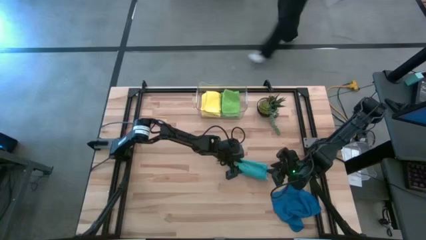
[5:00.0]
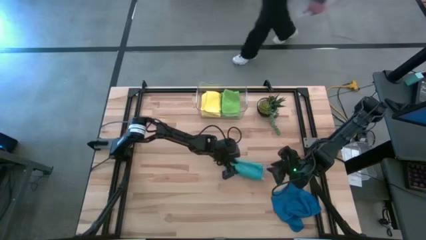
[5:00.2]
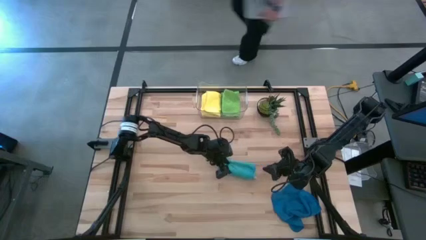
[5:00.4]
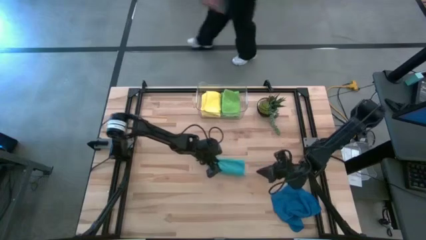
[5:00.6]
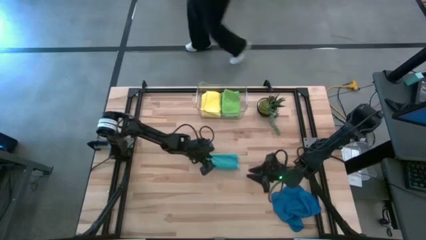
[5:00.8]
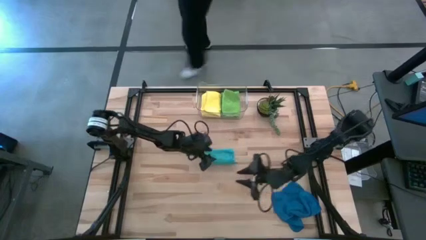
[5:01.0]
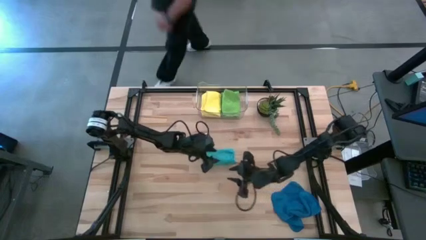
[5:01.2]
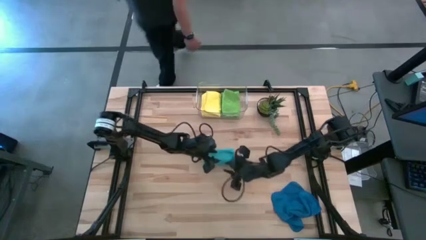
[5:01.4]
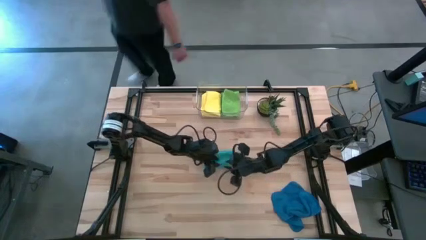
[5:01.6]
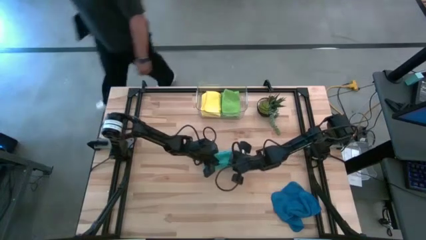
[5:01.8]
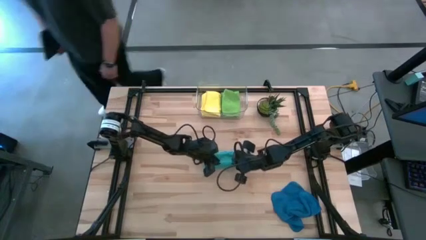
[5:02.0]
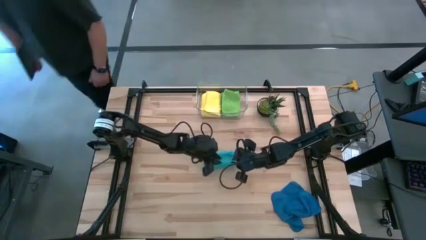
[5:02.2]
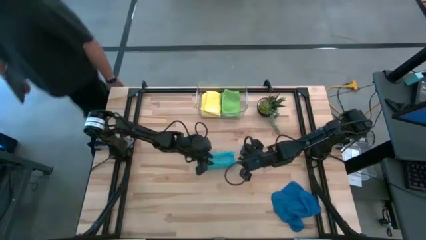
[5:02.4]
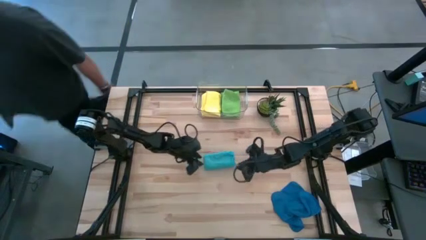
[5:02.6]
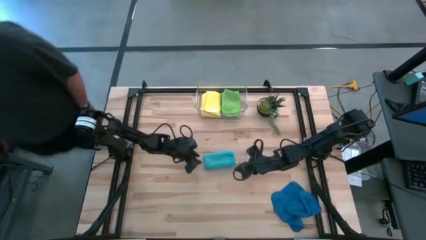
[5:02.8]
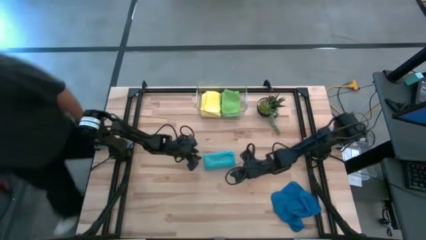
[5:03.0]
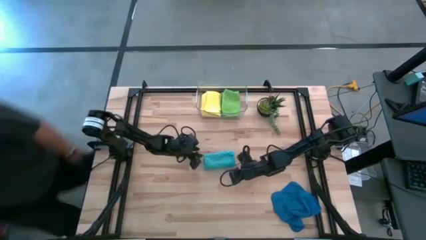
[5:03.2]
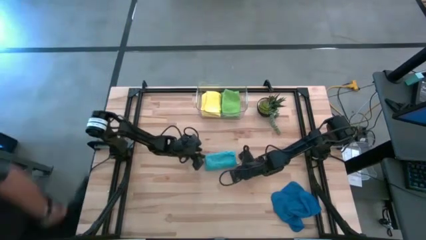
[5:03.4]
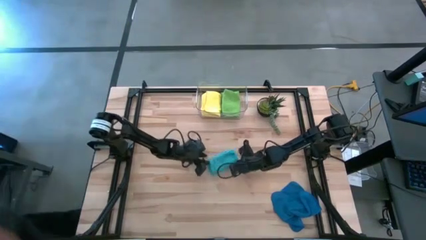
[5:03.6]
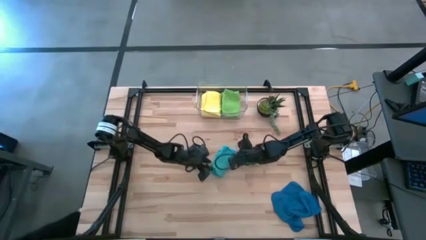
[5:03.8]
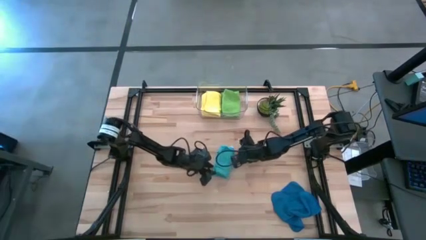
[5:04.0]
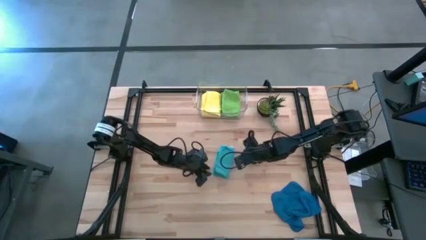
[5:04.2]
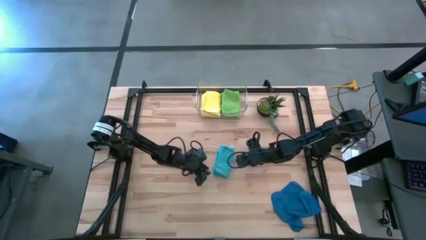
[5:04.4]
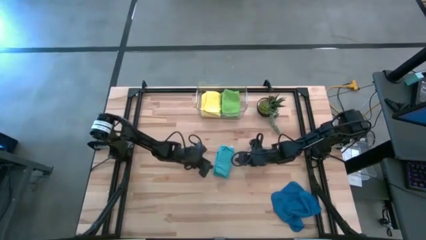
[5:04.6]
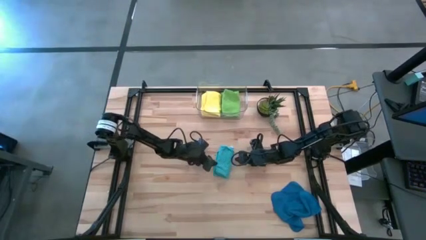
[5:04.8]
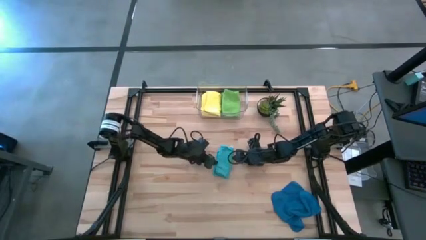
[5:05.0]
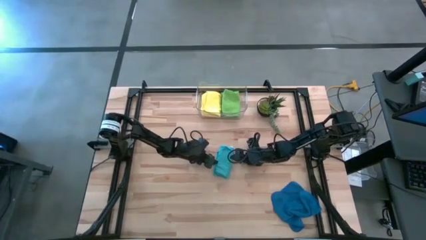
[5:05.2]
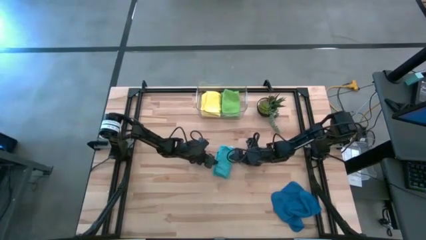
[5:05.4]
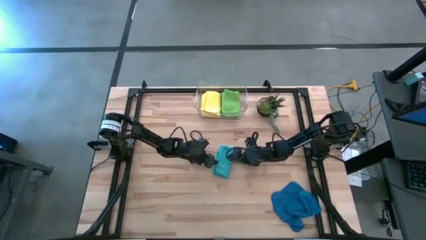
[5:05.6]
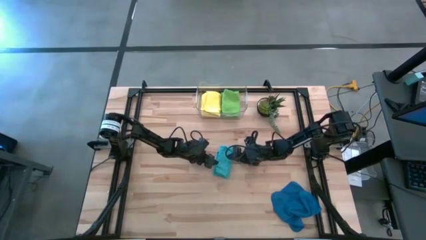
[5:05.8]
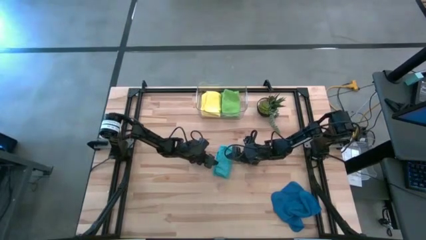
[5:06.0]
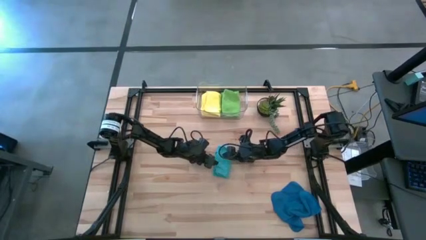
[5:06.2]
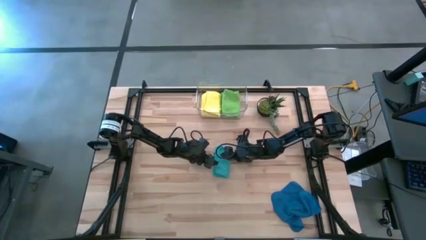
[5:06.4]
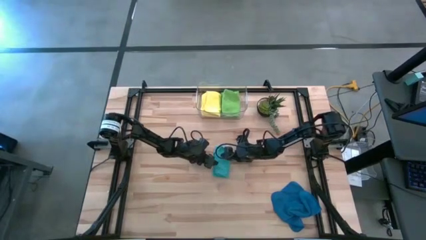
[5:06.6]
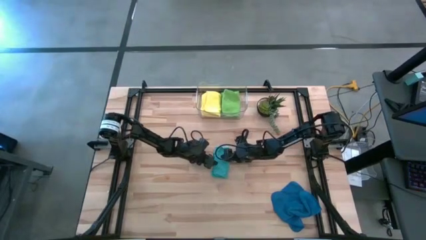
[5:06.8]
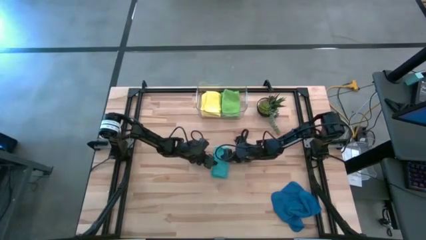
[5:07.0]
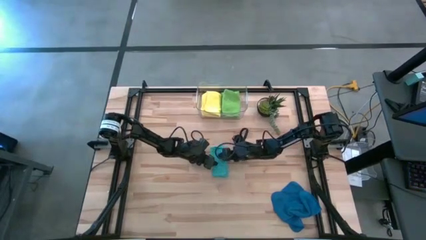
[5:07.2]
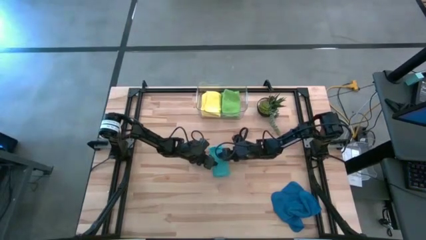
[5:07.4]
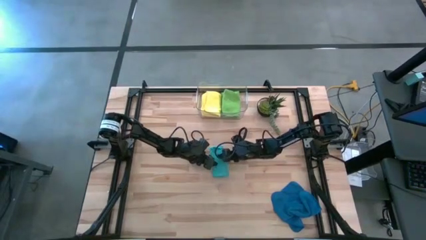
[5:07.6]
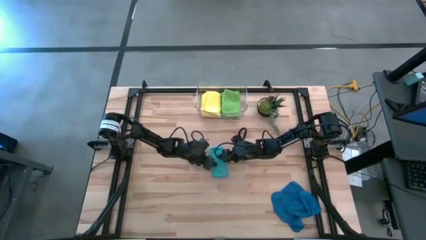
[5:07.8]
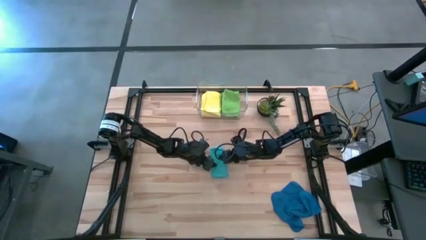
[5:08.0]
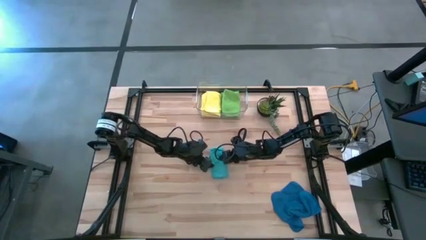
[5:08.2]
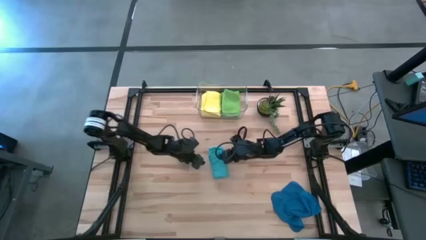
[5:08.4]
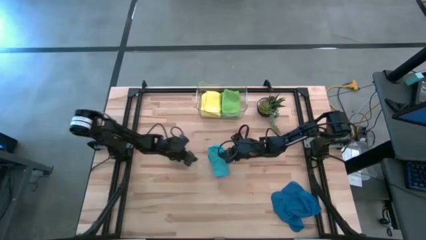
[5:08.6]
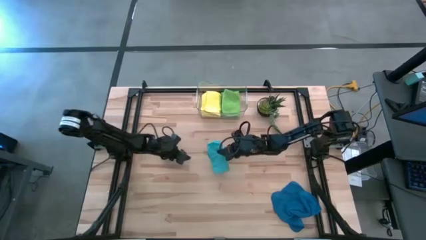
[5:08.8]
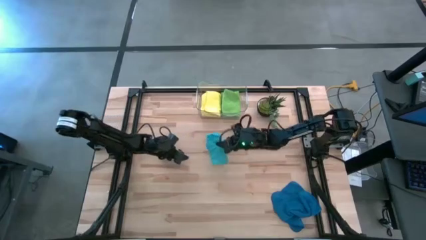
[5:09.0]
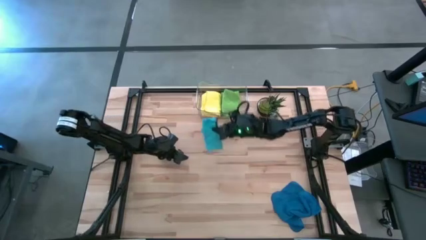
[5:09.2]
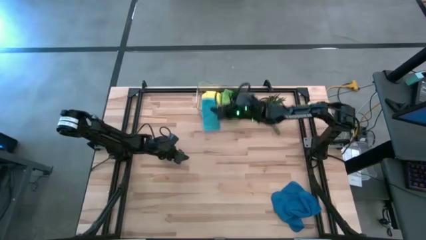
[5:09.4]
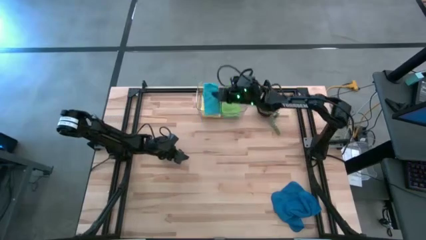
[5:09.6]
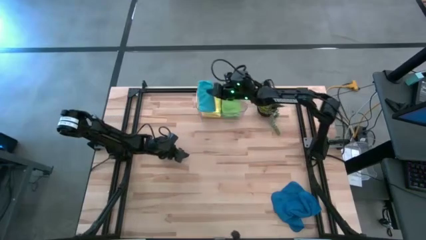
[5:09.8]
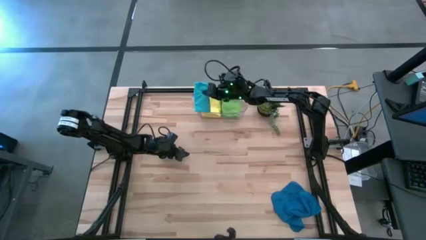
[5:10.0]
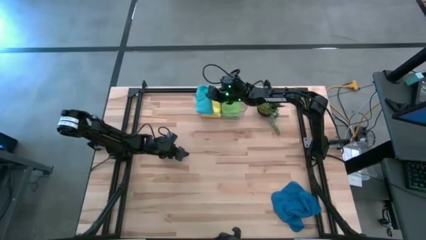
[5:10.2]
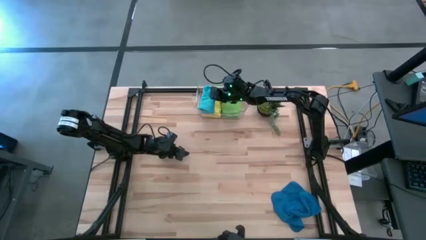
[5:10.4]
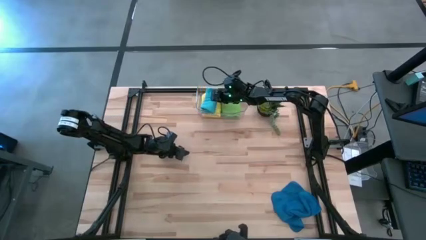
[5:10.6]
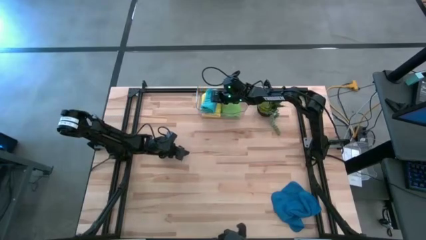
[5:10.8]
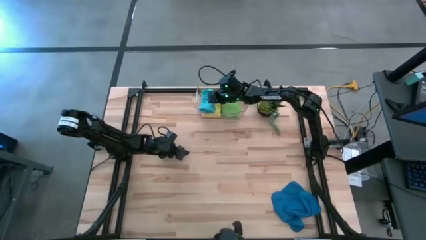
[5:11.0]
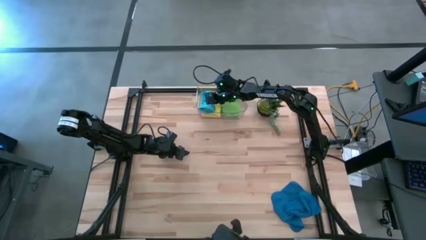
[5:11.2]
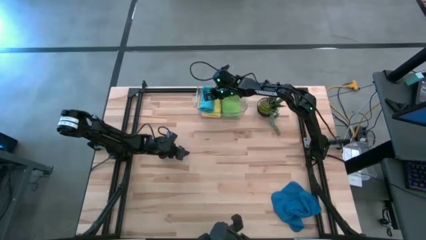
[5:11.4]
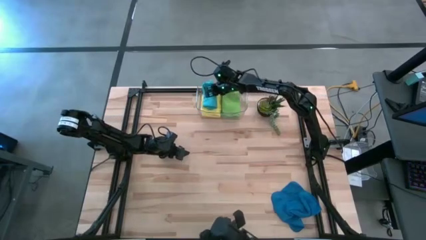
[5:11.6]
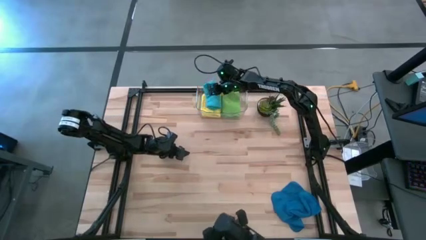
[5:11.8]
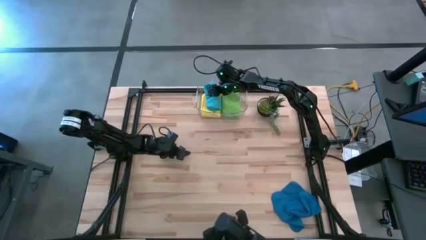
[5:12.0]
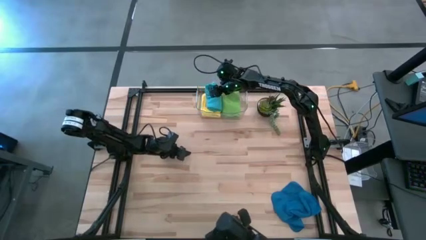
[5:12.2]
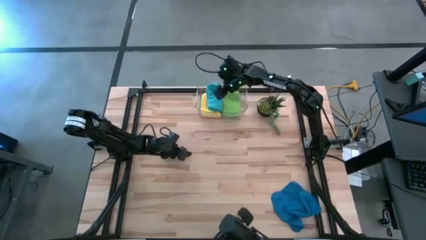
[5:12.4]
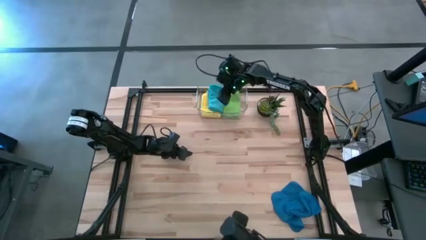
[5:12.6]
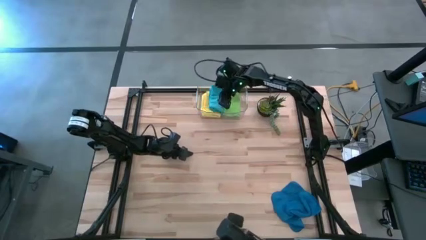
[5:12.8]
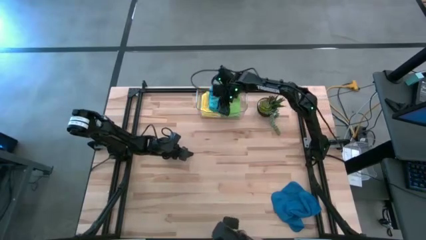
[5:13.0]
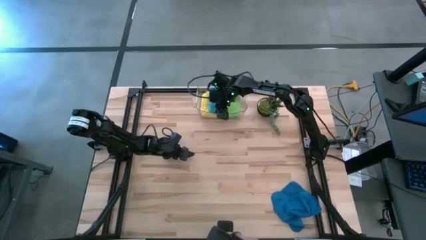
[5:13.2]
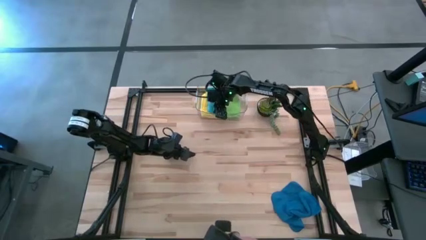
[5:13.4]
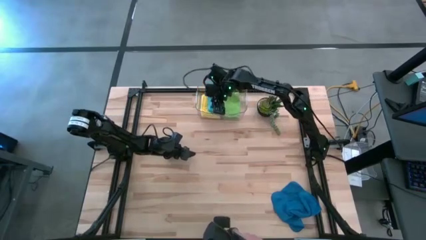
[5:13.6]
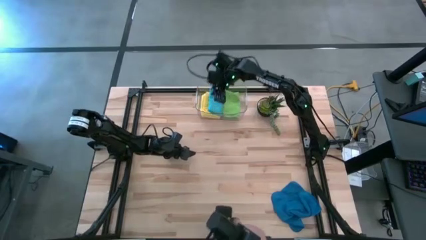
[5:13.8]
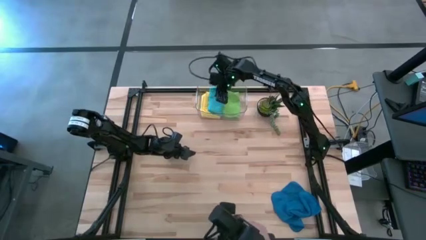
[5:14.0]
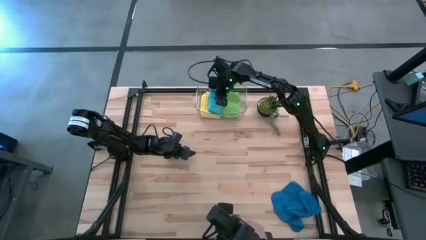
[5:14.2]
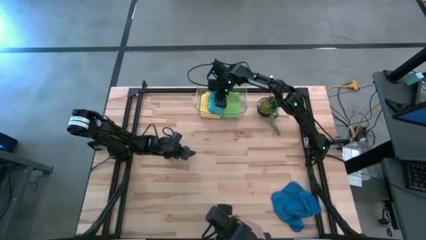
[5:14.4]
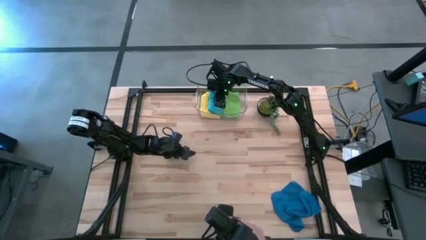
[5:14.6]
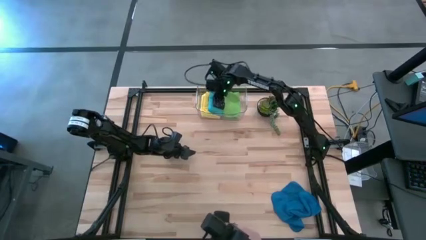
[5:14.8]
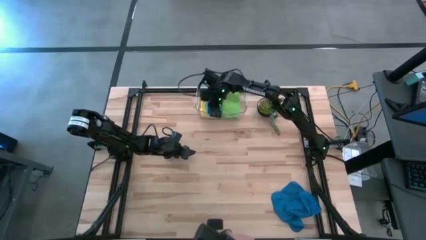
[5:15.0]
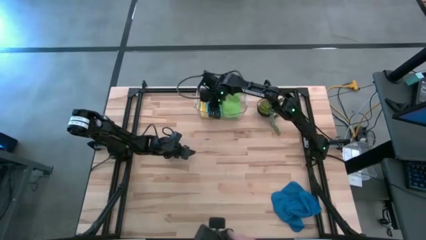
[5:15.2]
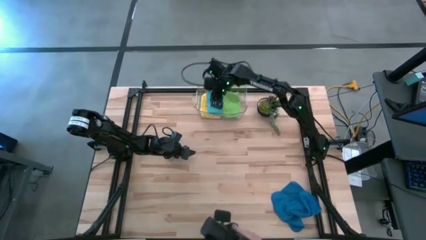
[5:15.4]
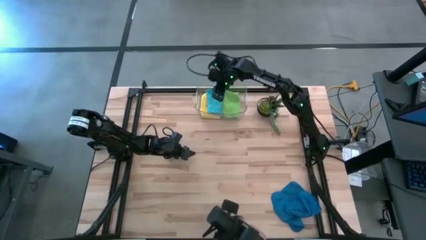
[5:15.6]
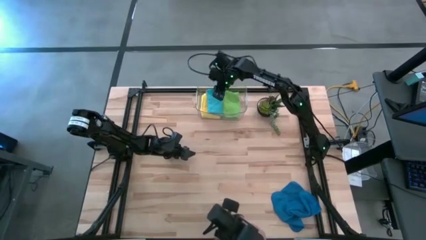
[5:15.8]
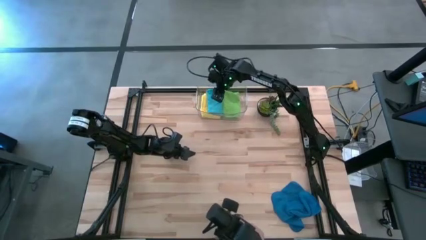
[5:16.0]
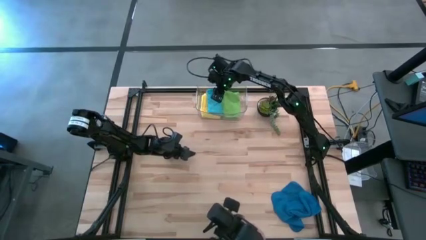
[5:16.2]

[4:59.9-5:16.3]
Task: Fold microfiber towels
Put the light blue microfiber towel into the transparent bin
